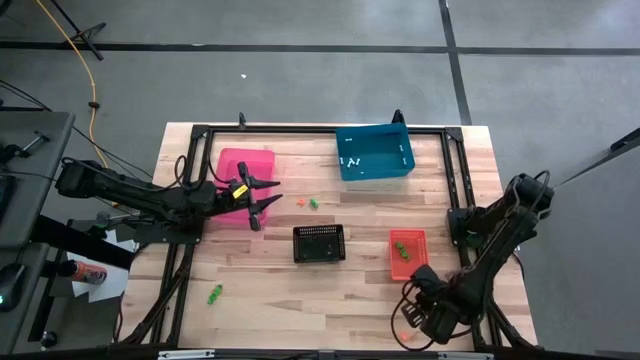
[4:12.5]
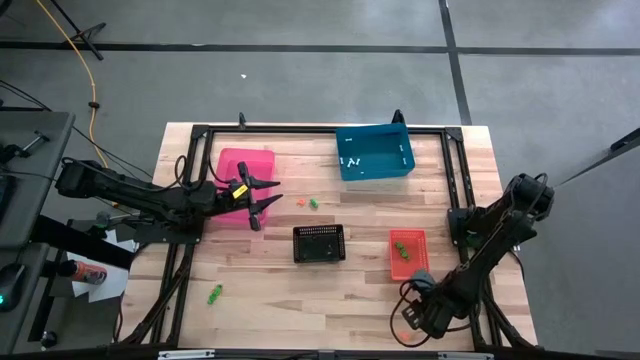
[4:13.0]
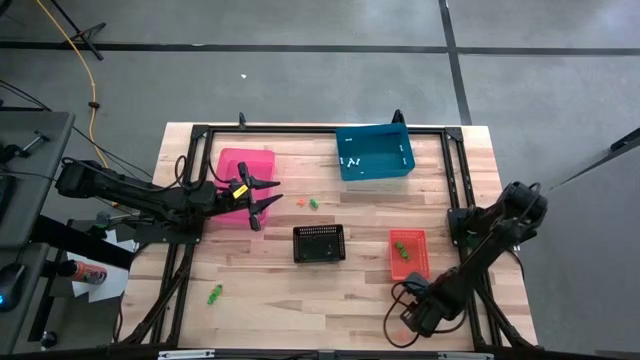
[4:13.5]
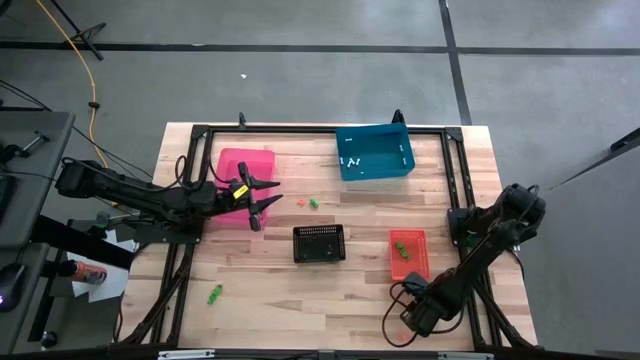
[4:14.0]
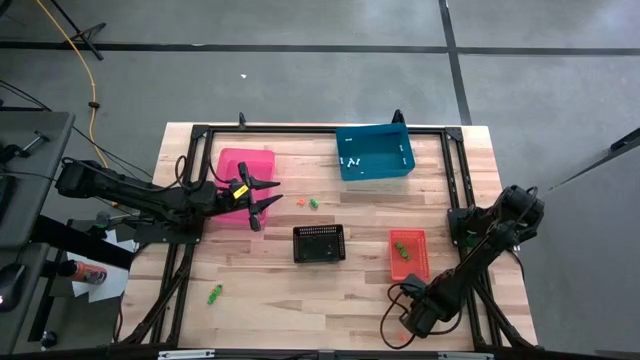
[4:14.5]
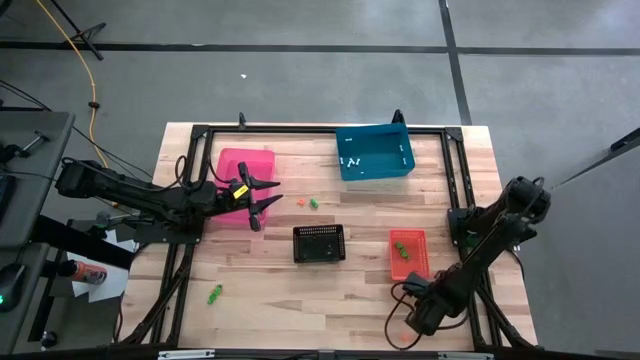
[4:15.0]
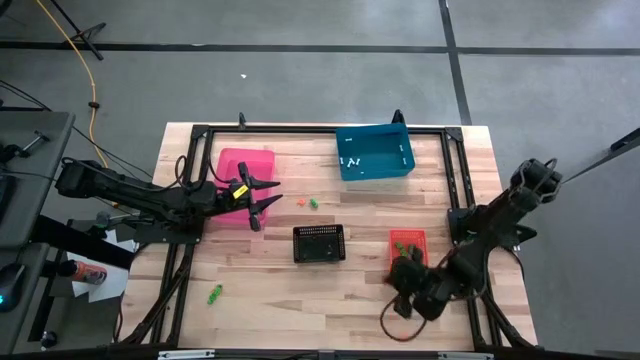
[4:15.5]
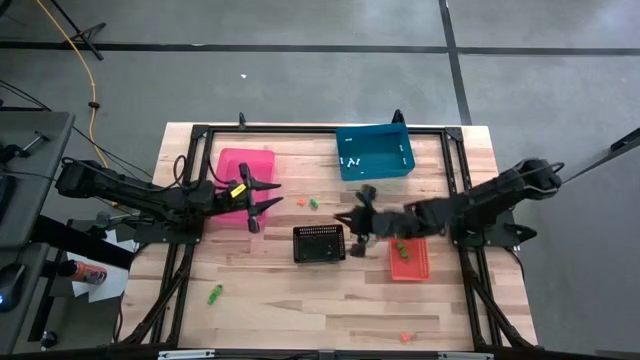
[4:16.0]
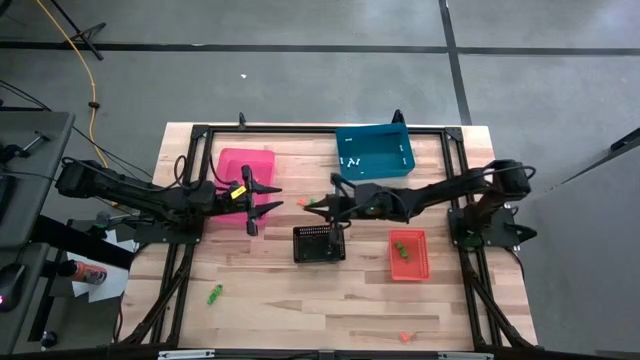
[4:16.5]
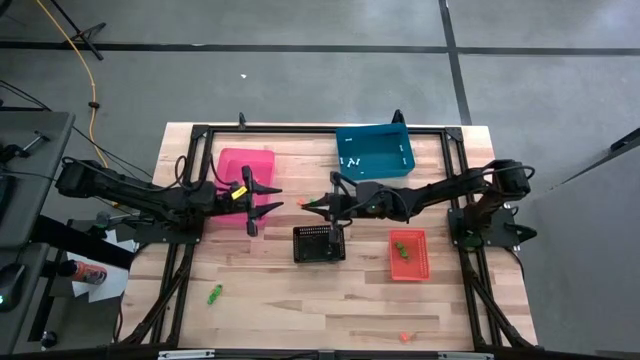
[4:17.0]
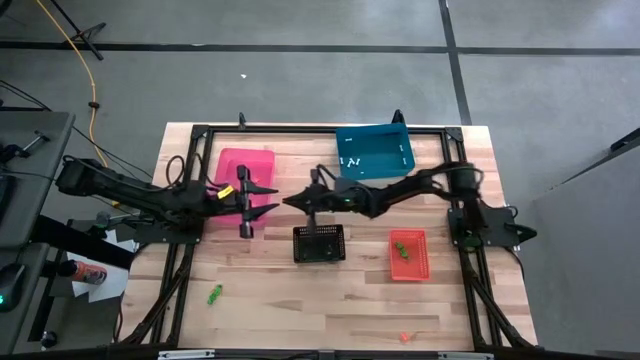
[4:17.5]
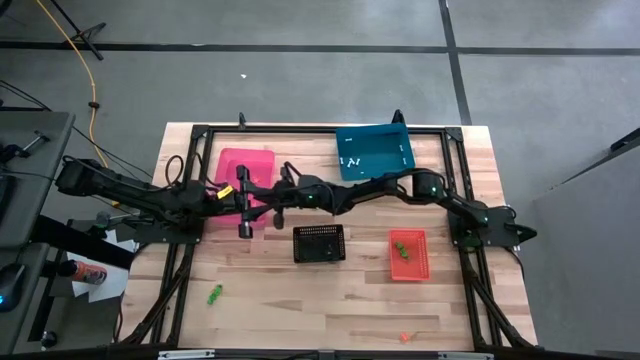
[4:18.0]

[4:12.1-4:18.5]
Task: Sort Halloween decoration
Put the orange spider toy into the pink bin

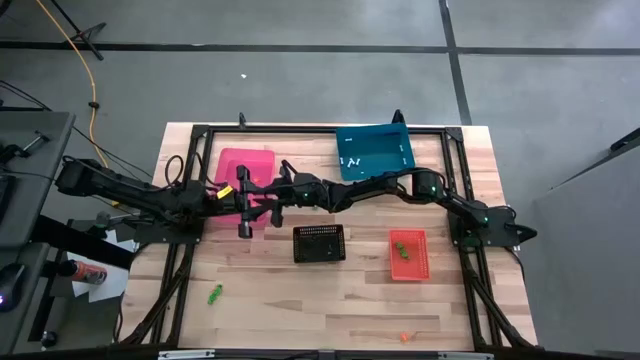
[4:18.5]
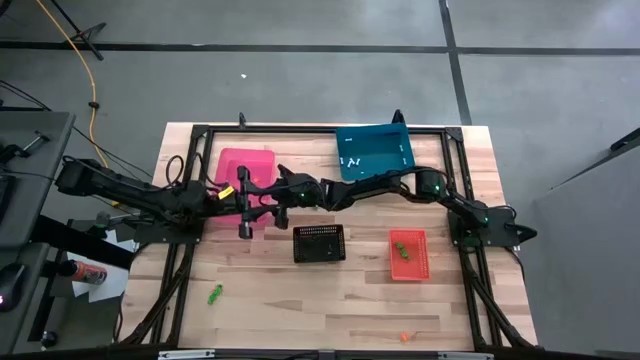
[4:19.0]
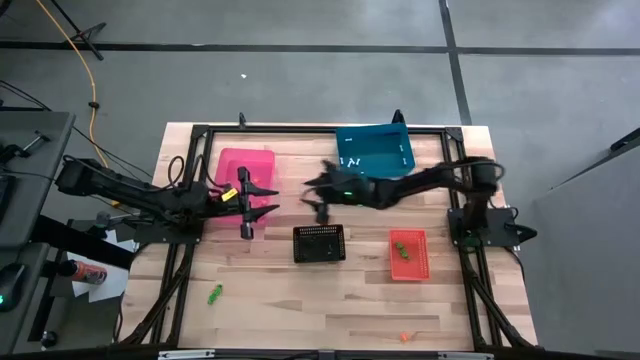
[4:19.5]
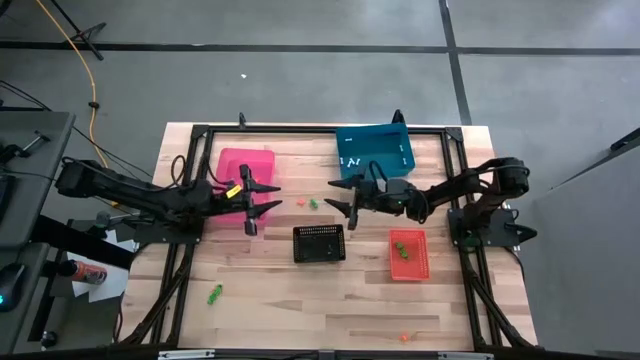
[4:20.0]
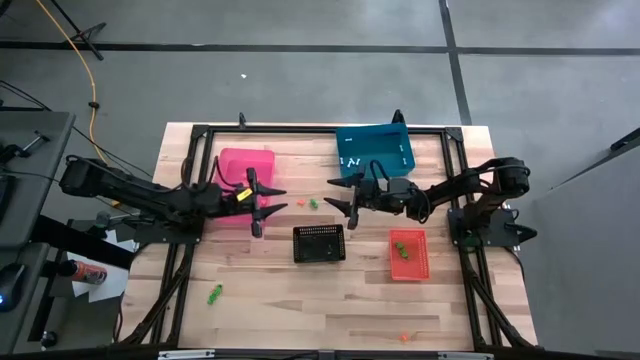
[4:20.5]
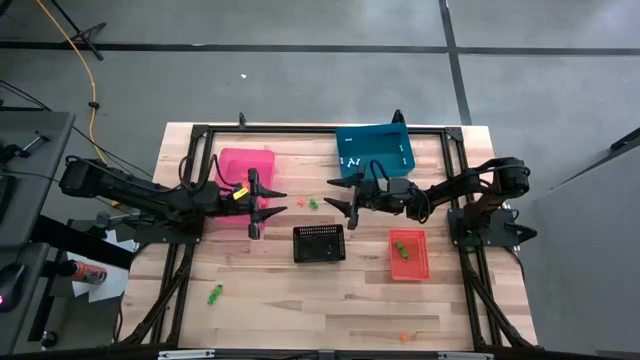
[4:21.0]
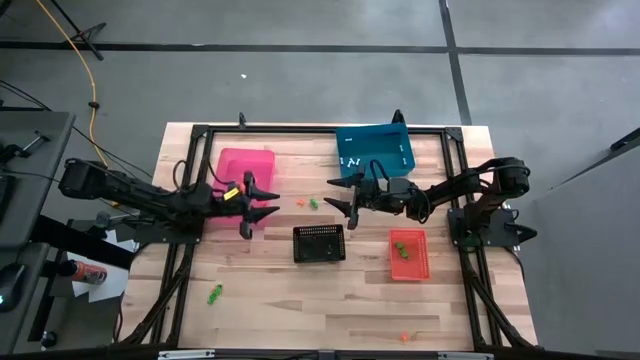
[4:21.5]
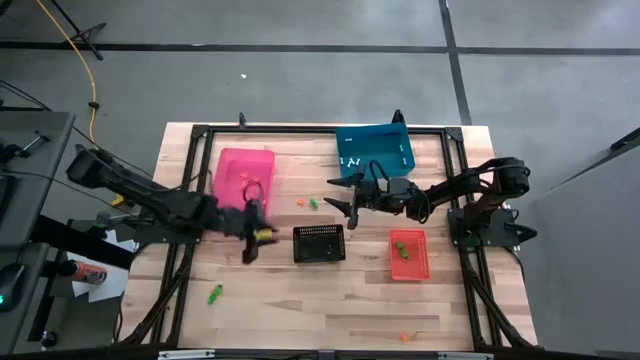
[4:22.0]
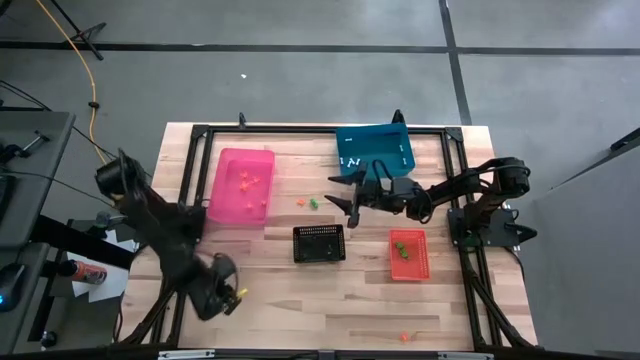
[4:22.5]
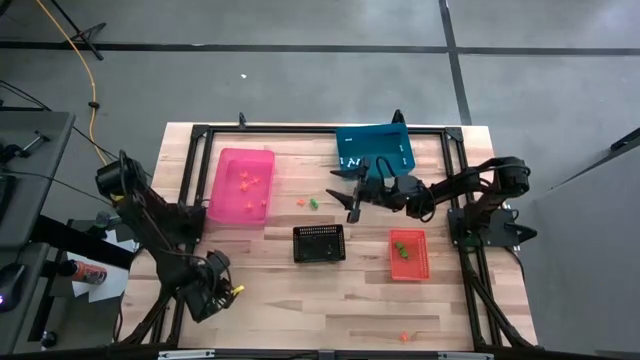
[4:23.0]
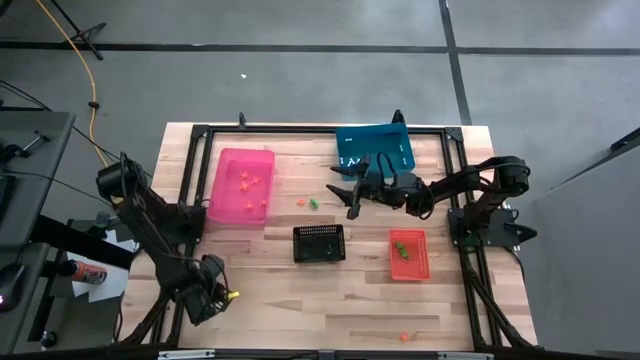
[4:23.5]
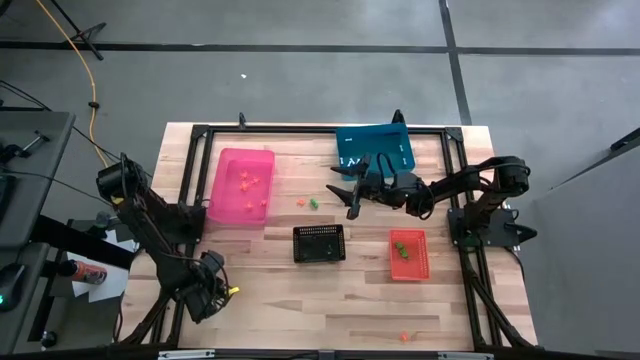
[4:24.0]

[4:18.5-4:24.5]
Put the green skeleton toy into the orange bin

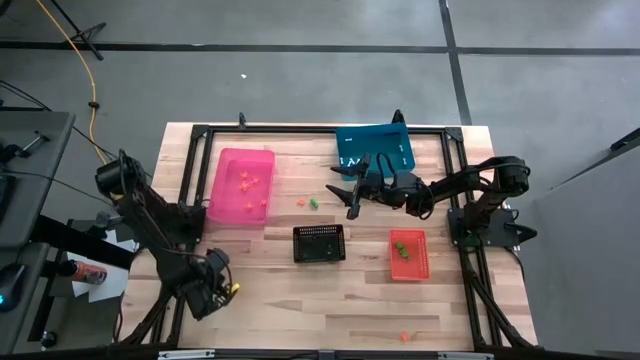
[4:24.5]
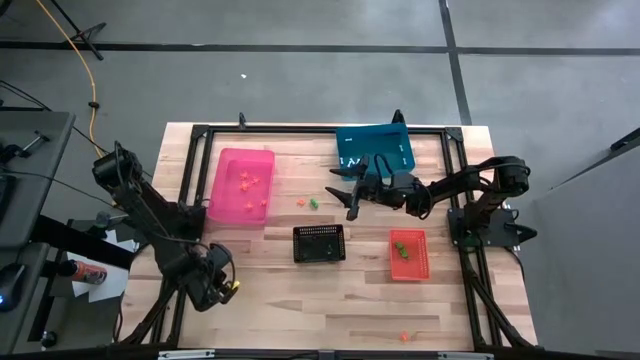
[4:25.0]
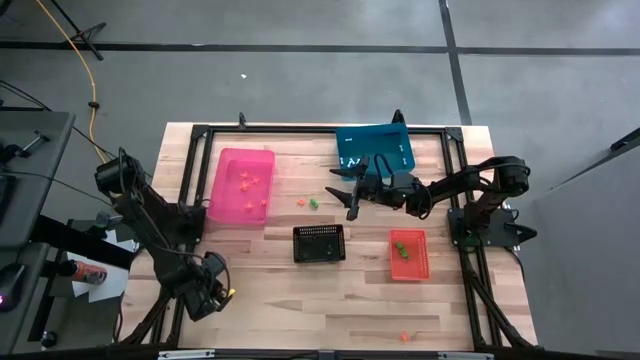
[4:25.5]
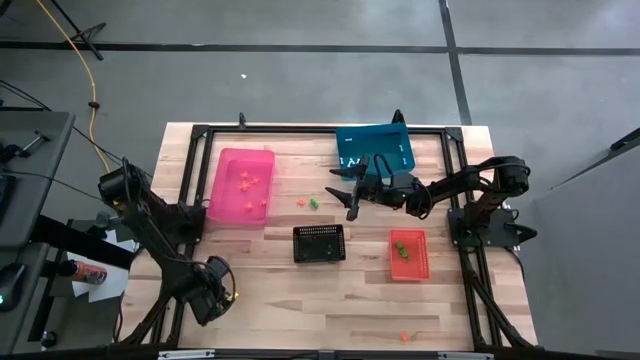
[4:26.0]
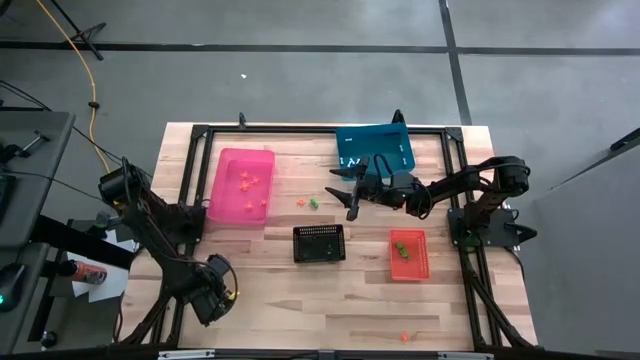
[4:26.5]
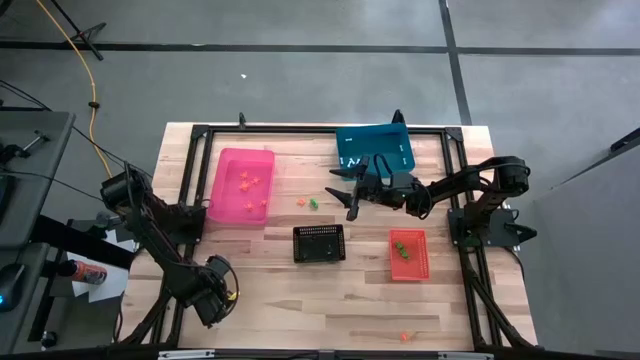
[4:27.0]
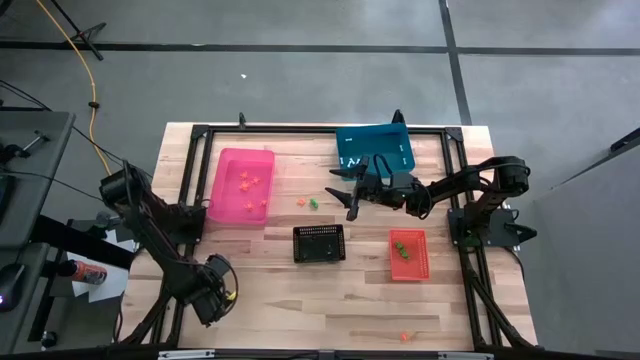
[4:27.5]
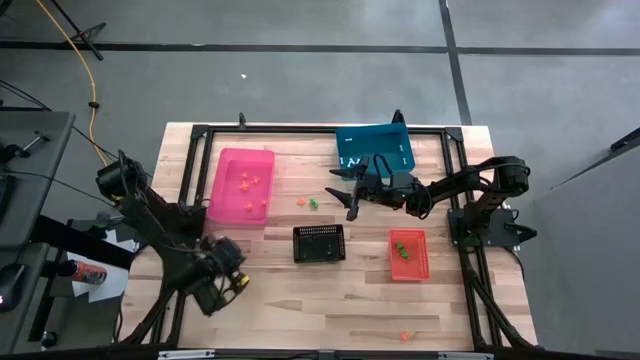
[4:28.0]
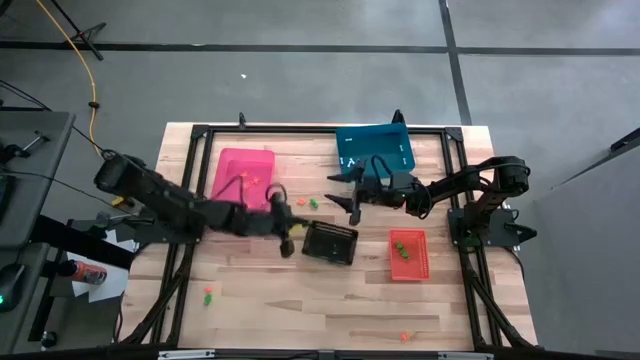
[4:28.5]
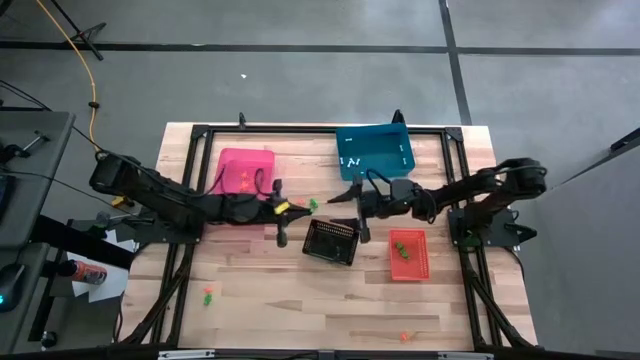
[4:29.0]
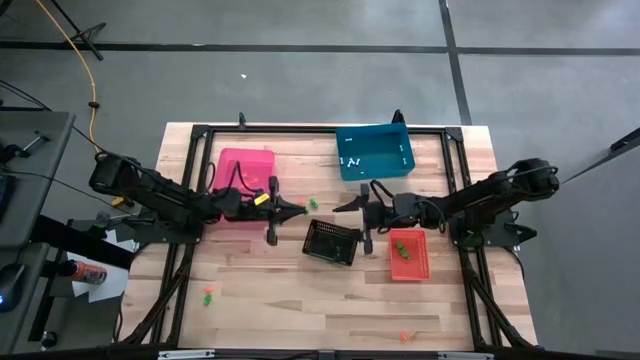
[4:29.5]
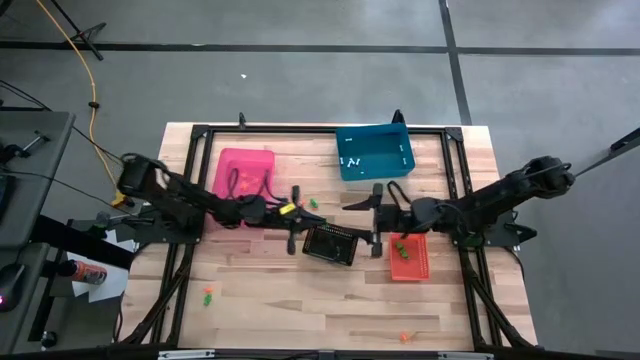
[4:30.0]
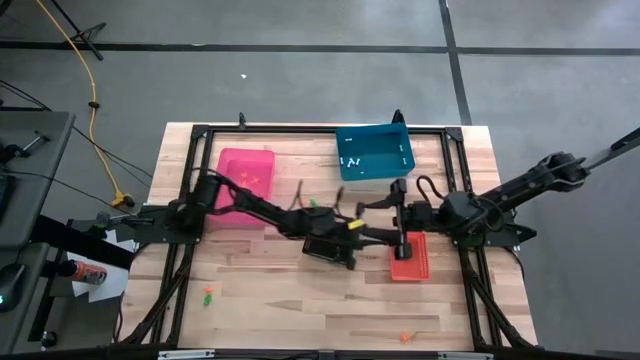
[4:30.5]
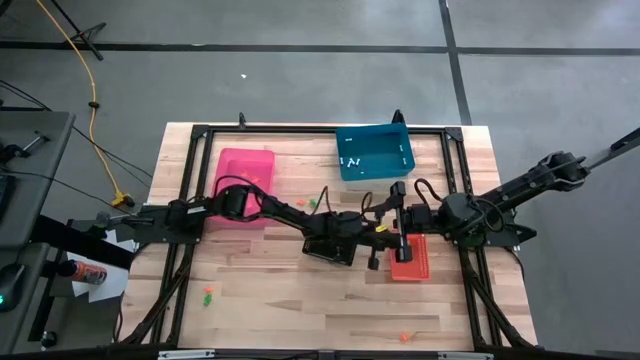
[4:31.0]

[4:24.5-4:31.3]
Put the green skeleton toy into the orange bin

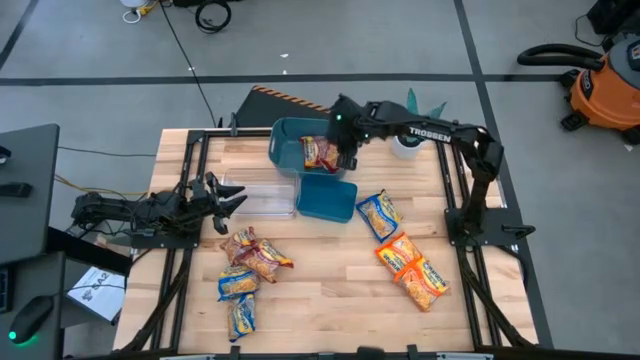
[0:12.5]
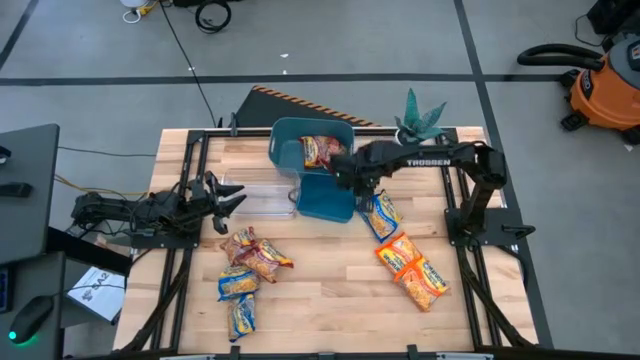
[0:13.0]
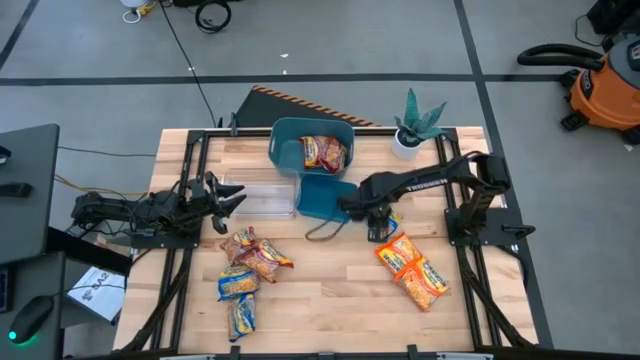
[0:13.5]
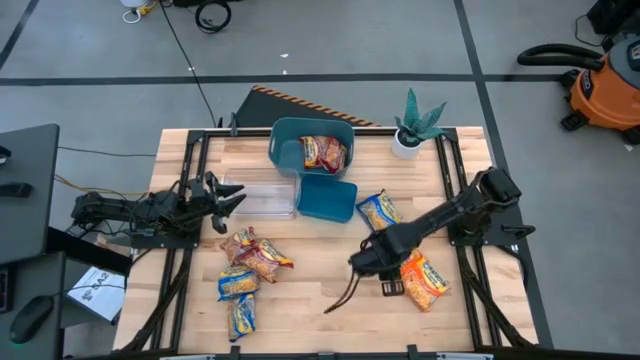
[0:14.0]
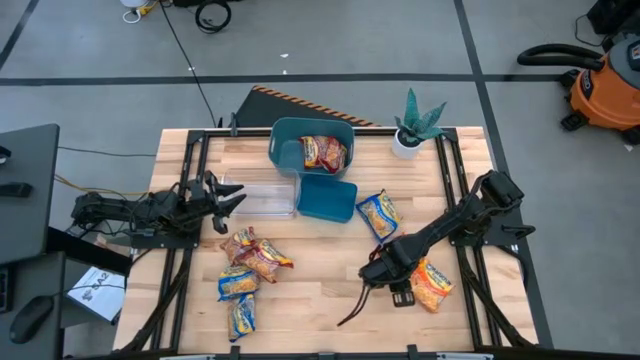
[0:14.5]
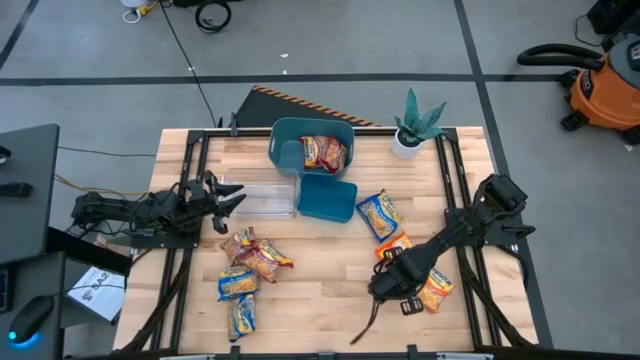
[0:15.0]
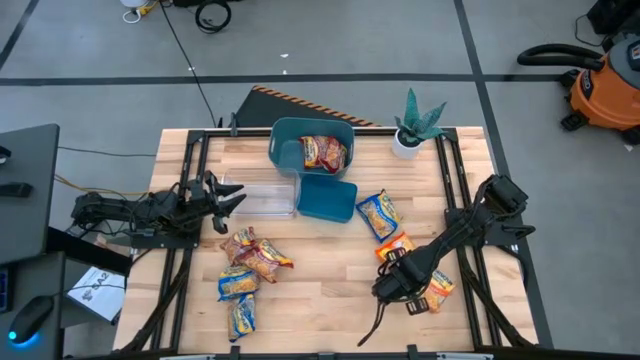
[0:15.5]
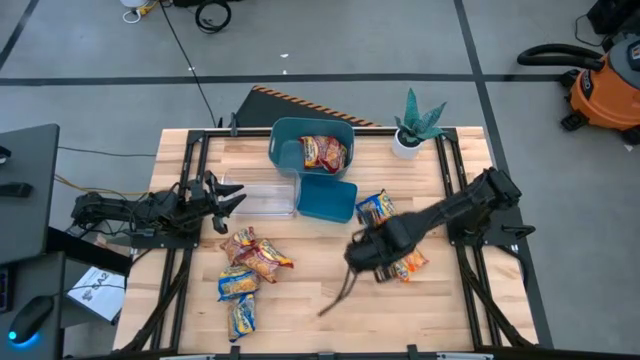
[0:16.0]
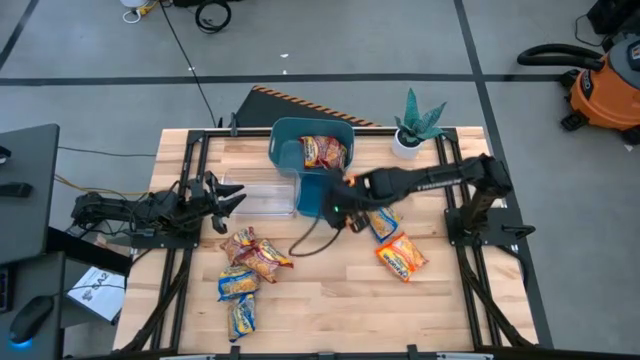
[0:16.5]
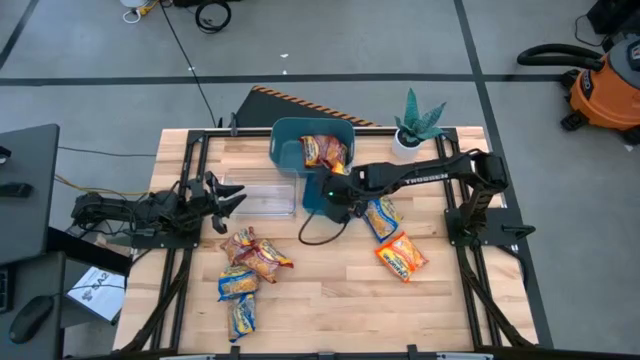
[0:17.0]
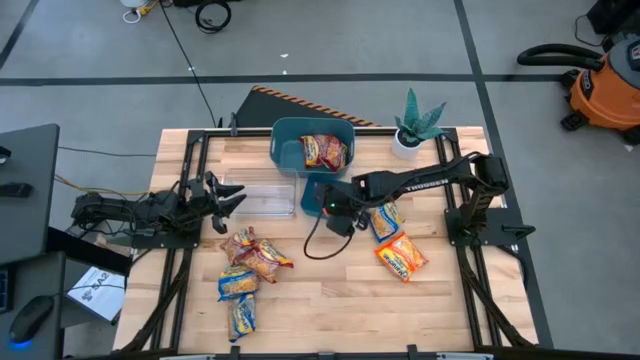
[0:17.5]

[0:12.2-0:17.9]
Task: Sort Maruchan noodles
Put the orange noodle pack into the blue bin
